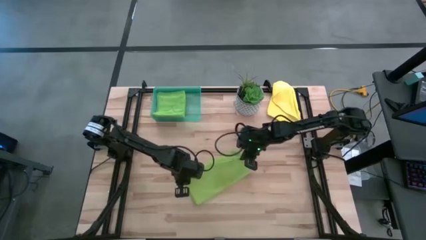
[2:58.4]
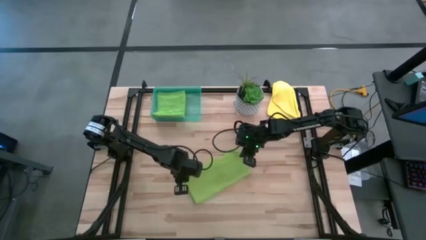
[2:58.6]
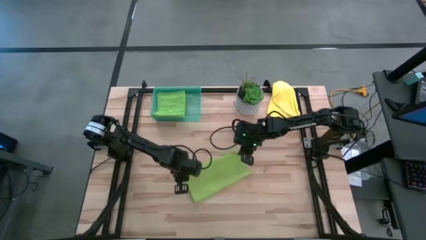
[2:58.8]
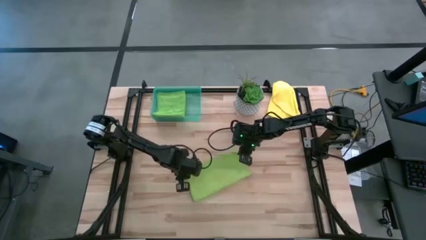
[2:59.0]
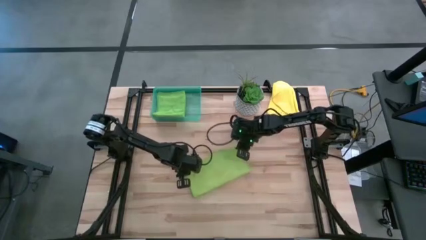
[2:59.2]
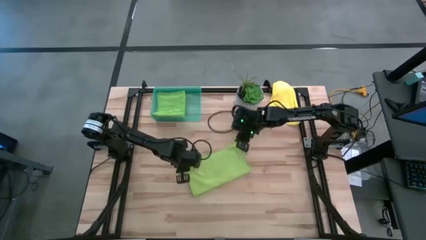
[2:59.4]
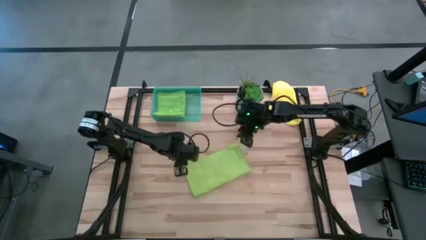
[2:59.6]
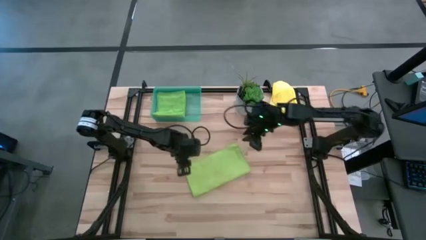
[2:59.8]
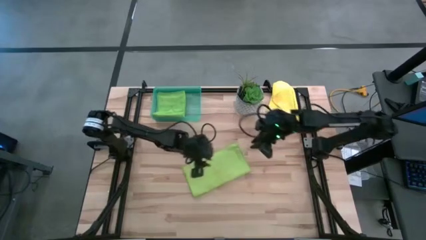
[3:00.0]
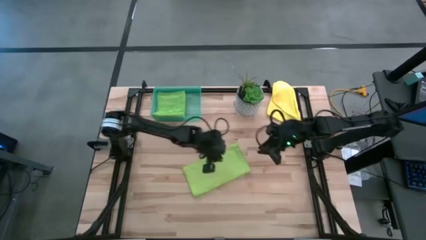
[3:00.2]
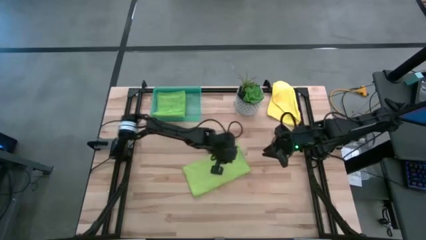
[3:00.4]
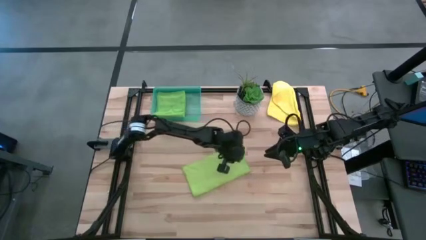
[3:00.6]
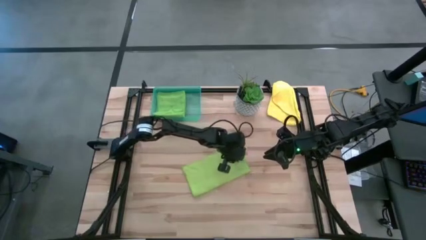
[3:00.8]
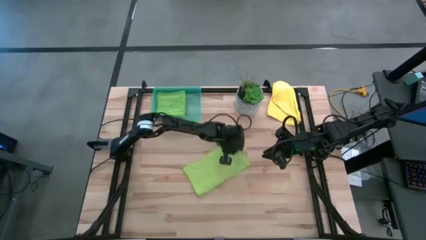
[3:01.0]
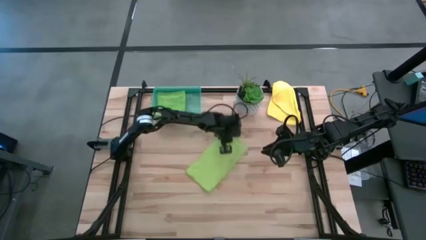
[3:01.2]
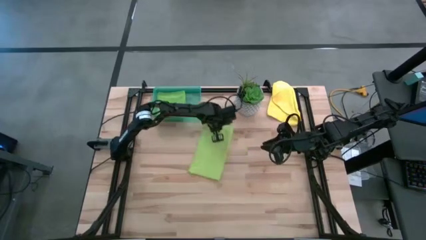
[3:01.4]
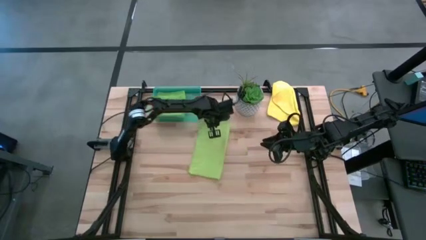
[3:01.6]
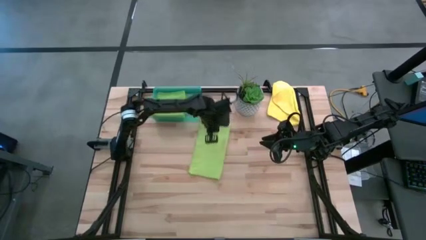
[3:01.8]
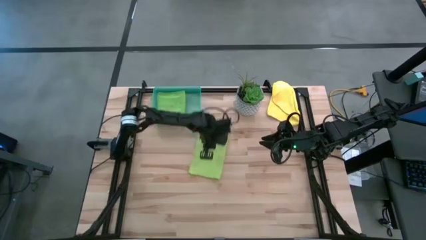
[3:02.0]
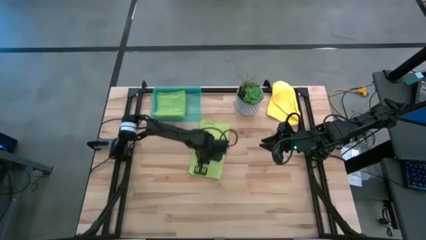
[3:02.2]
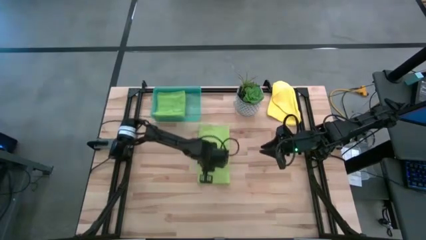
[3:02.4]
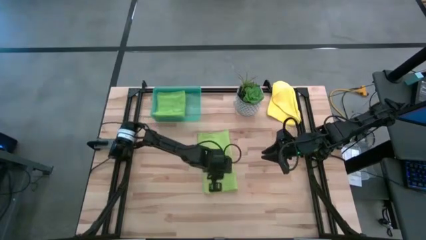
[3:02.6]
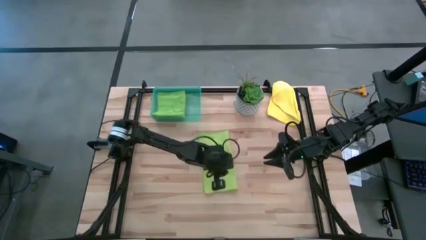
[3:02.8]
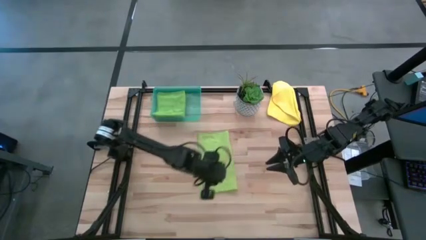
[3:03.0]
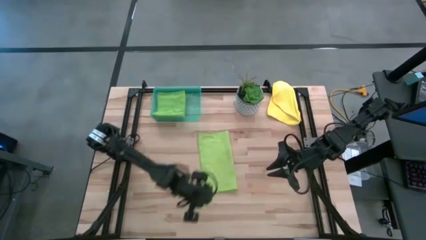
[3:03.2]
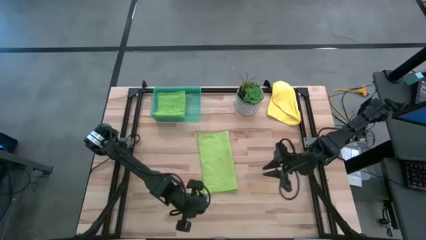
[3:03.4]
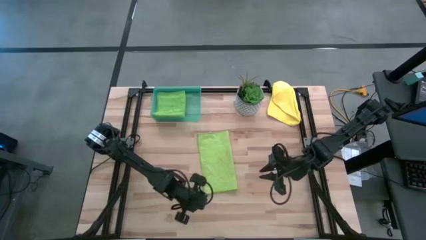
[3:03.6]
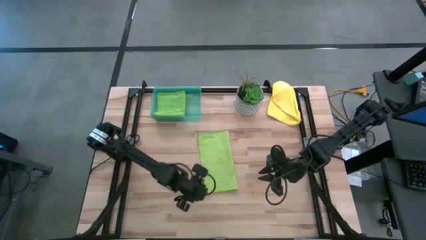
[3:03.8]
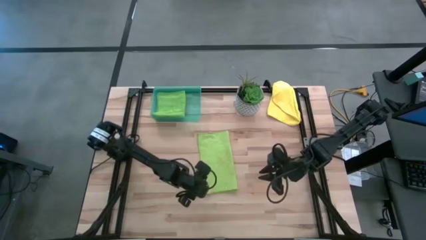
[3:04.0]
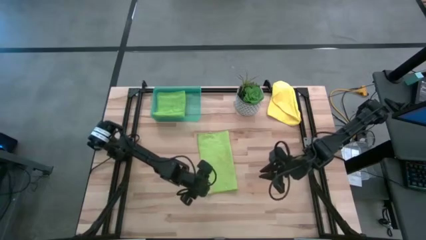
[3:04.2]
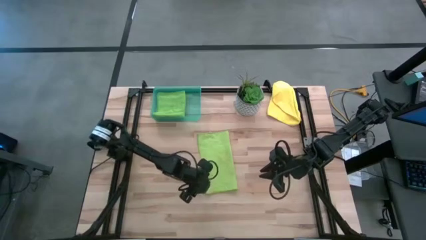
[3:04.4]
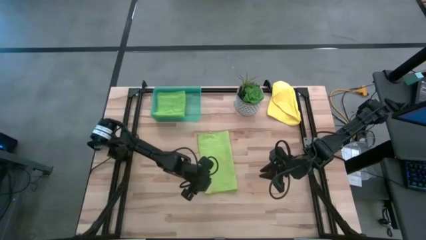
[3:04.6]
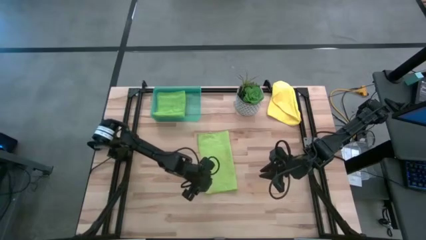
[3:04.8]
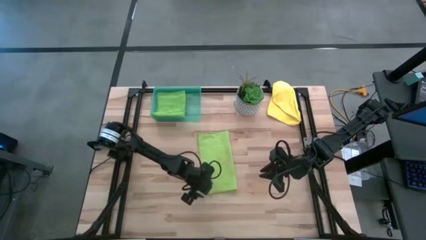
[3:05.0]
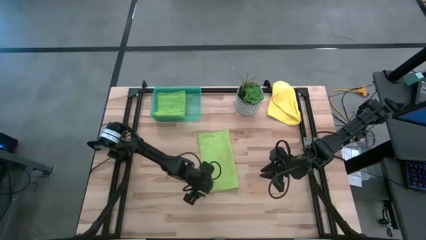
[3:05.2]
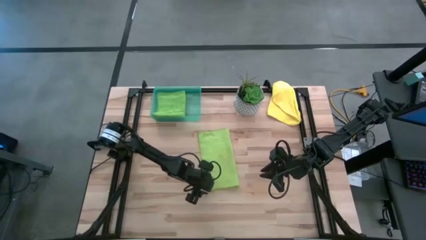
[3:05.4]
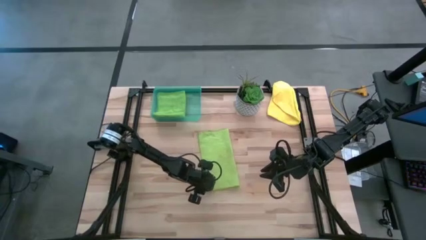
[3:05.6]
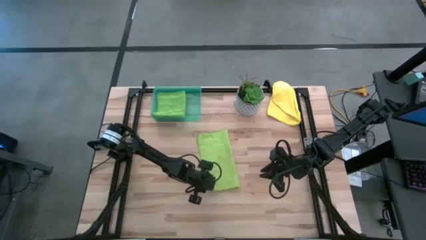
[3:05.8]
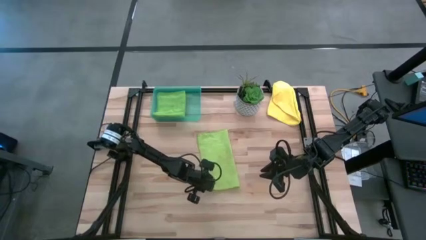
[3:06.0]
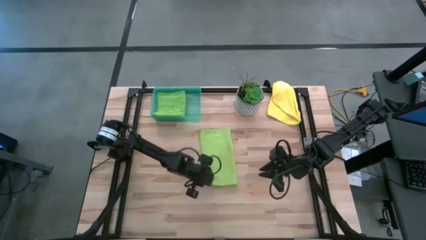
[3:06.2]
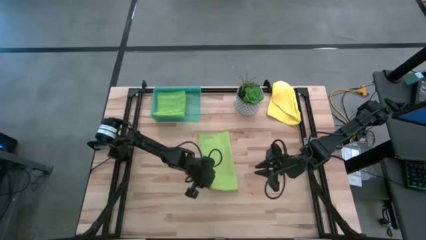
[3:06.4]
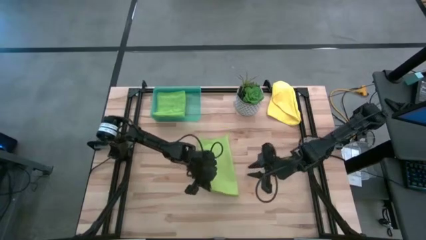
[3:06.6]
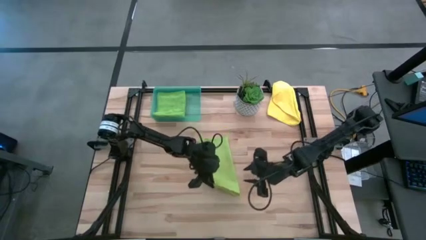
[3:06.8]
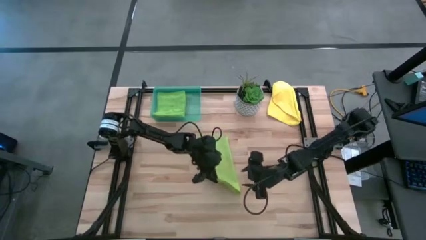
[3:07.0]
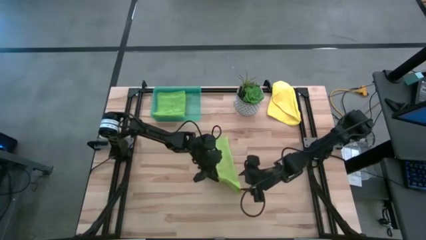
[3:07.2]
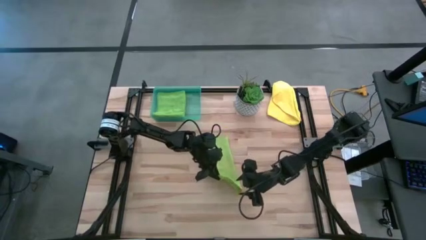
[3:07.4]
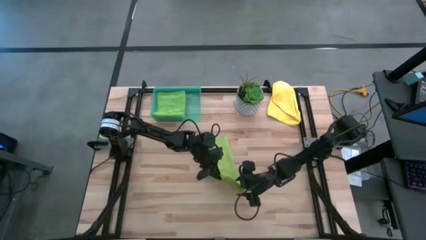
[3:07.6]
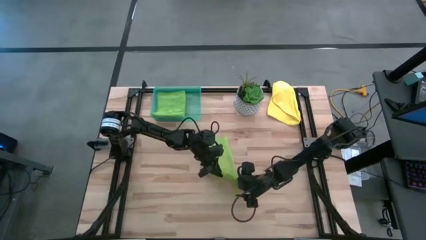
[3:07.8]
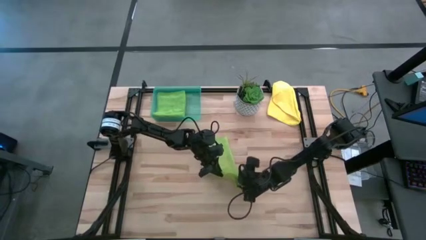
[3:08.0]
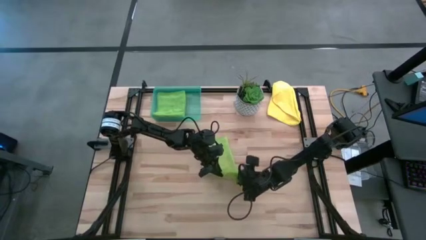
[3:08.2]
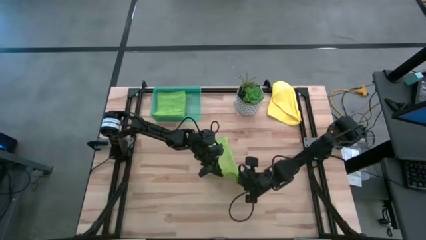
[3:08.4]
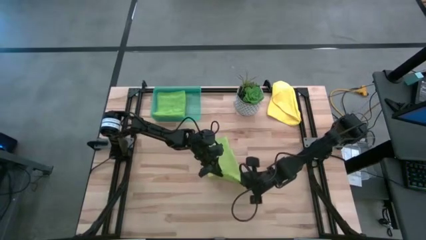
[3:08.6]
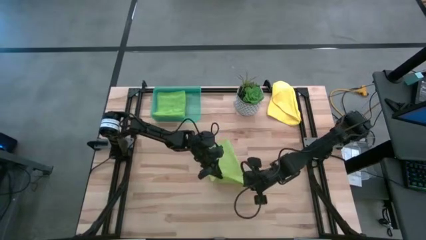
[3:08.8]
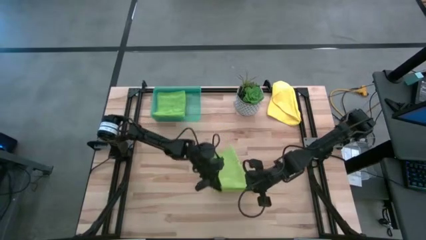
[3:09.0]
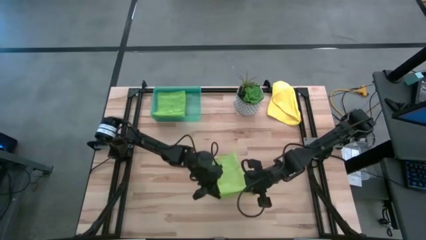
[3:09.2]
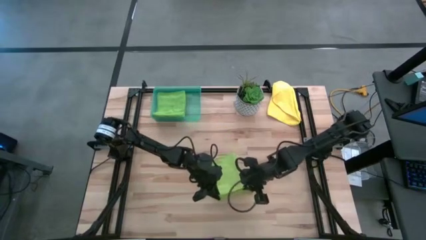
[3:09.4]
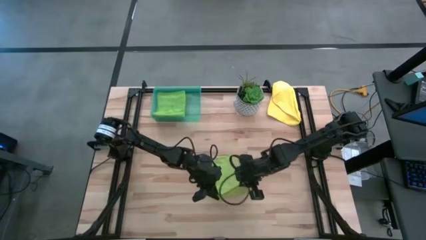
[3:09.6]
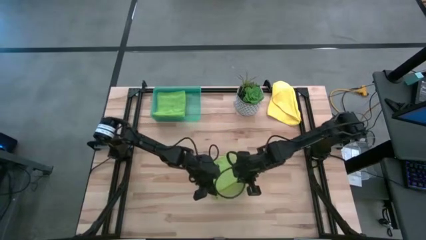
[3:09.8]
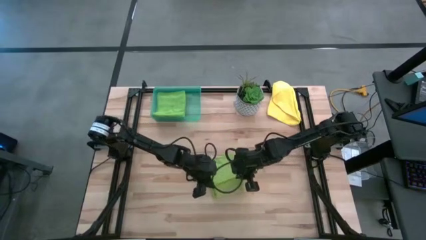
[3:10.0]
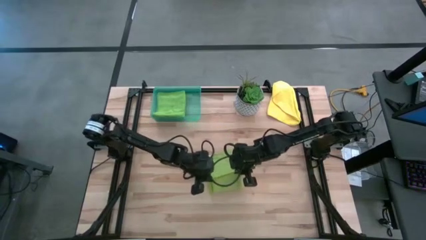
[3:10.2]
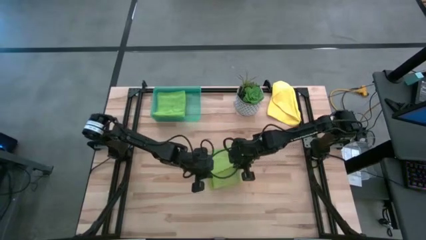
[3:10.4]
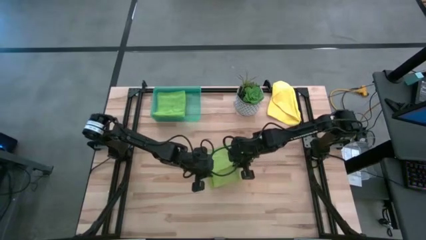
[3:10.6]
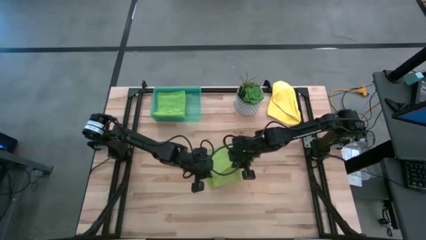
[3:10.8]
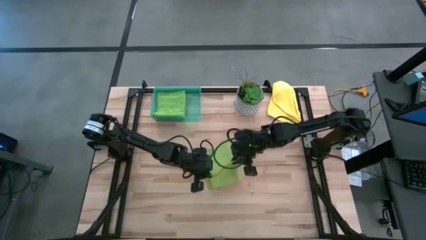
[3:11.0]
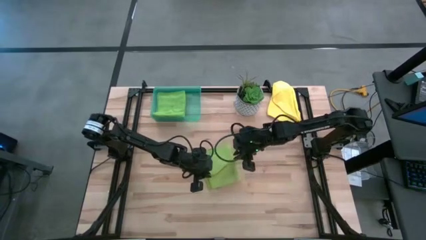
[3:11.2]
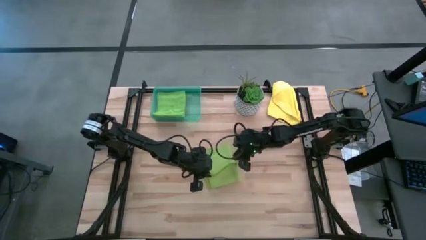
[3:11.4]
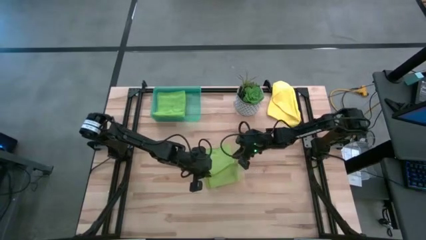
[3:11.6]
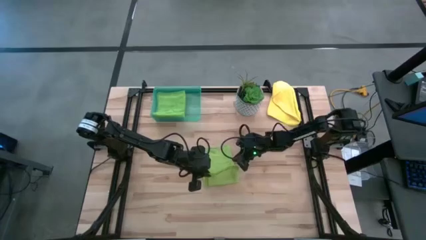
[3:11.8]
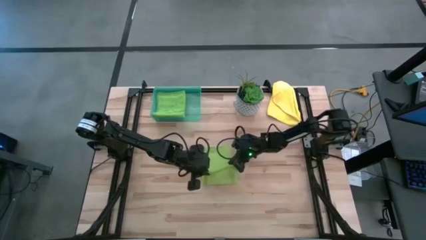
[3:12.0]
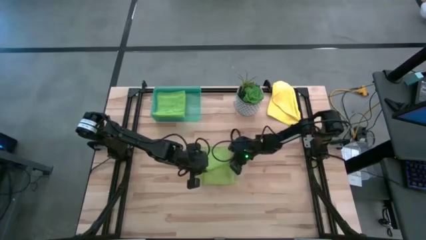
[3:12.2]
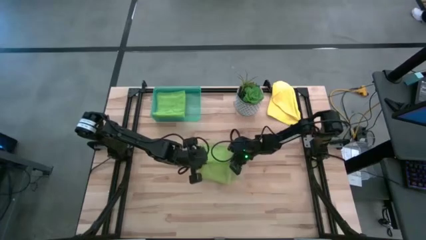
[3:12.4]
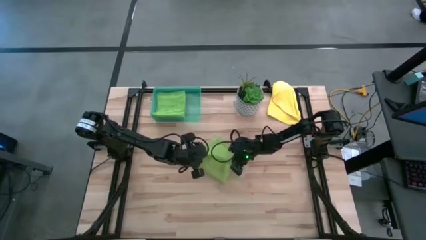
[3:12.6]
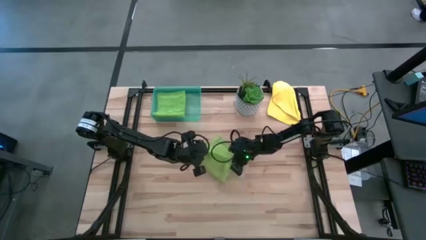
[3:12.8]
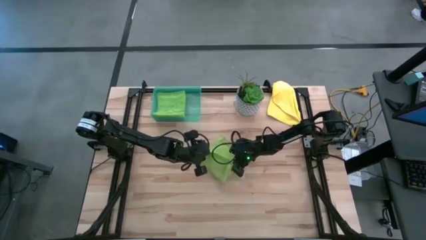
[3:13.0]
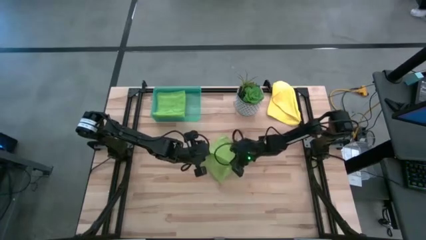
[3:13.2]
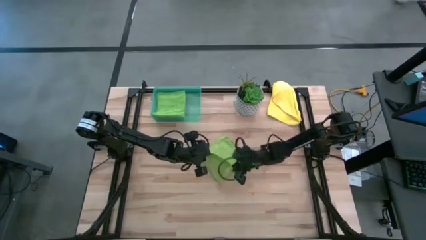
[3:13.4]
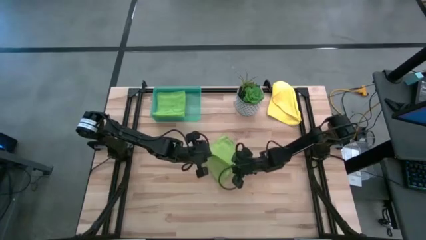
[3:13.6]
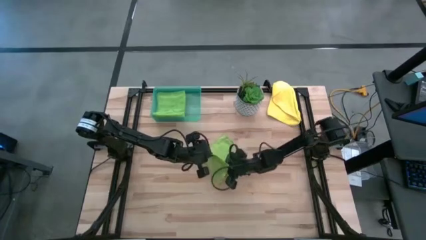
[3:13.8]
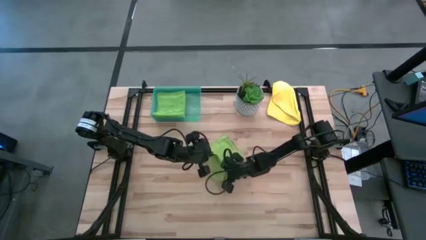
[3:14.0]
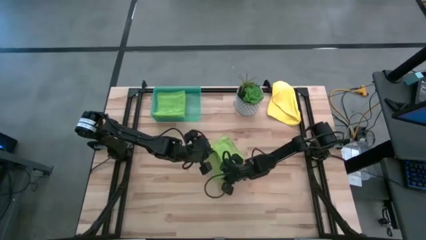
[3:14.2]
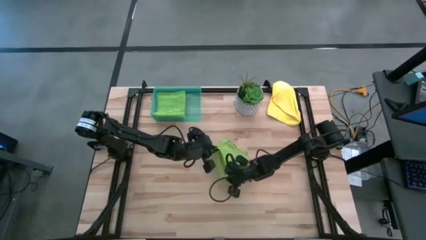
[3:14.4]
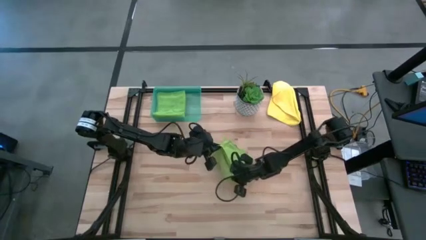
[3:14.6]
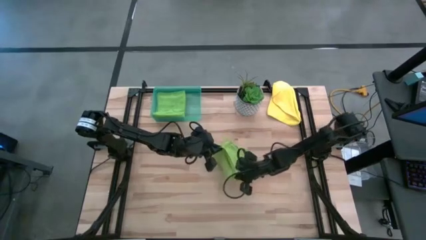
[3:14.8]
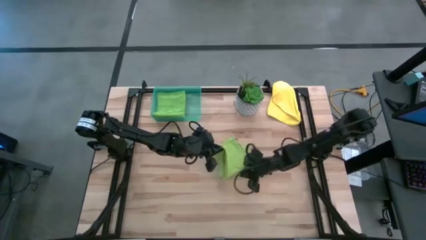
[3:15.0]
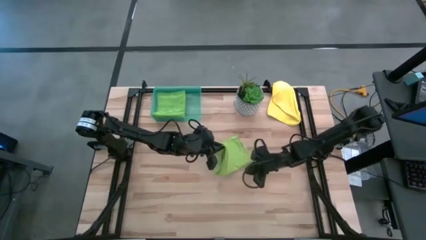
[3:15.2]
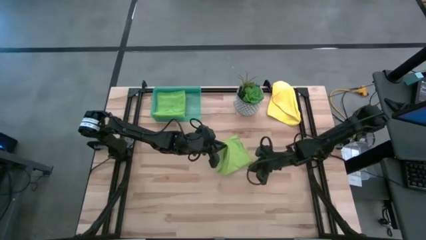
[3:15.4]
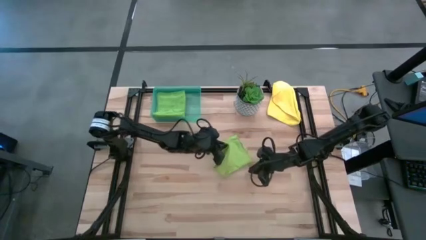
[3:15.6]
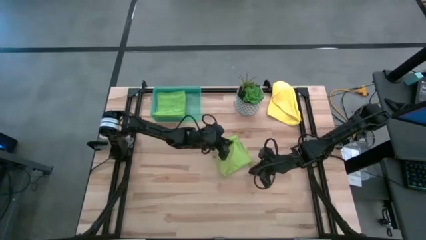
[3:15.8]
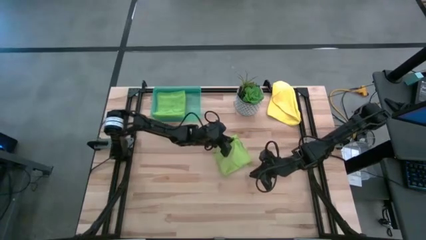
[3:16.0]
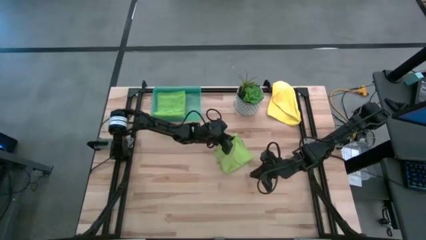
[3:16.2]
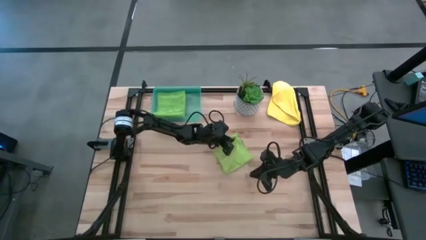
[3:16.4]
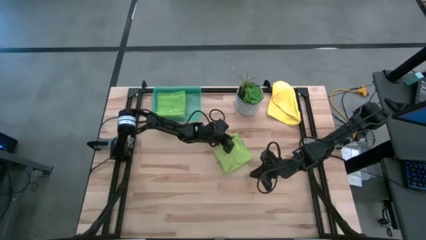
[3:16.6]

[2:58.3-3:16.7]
Task: Fold microfiber towels
Fold the yellow-green microfiber cloth
